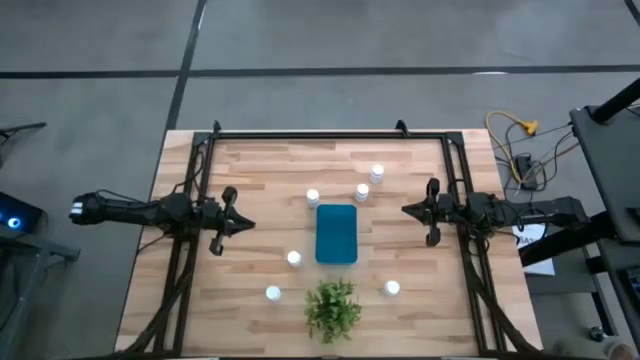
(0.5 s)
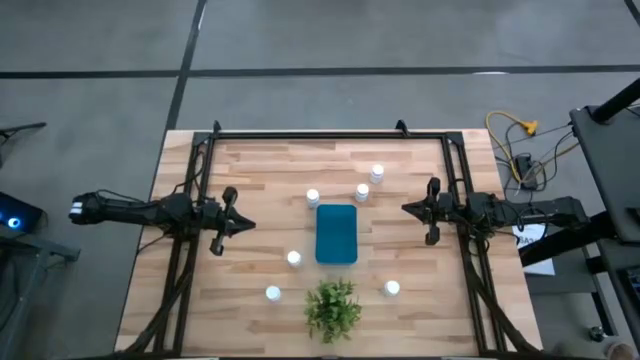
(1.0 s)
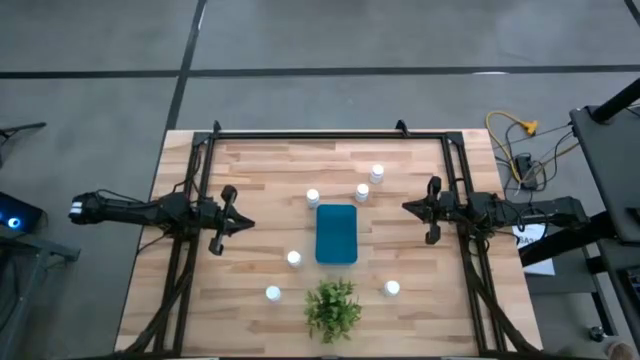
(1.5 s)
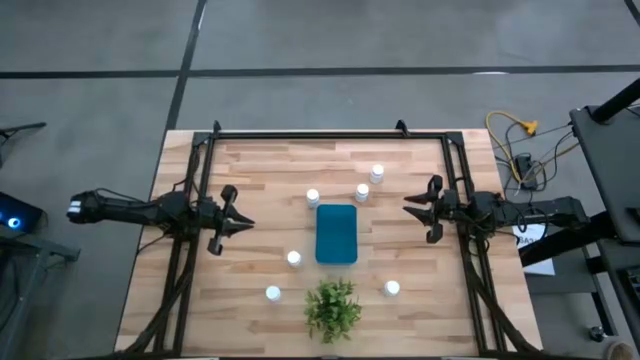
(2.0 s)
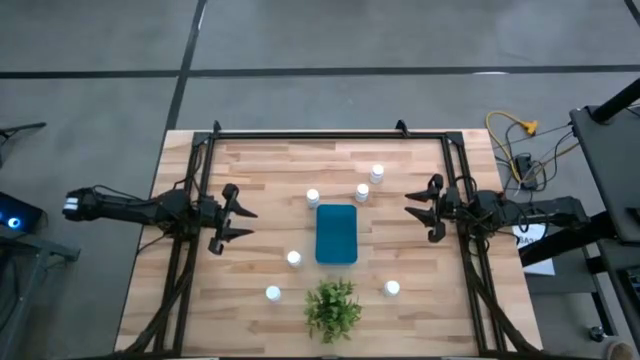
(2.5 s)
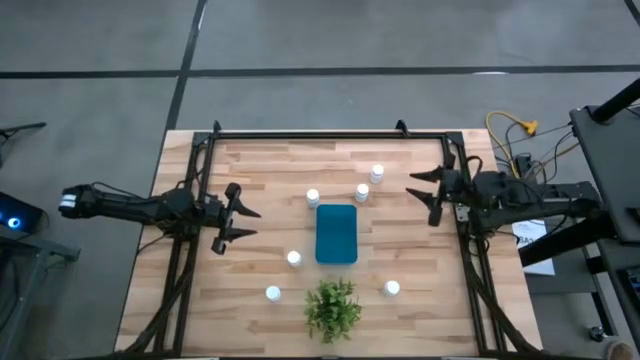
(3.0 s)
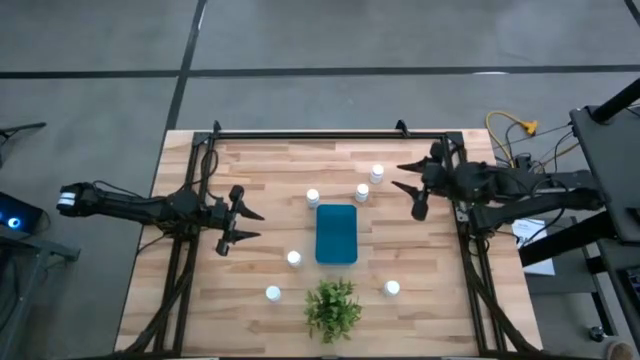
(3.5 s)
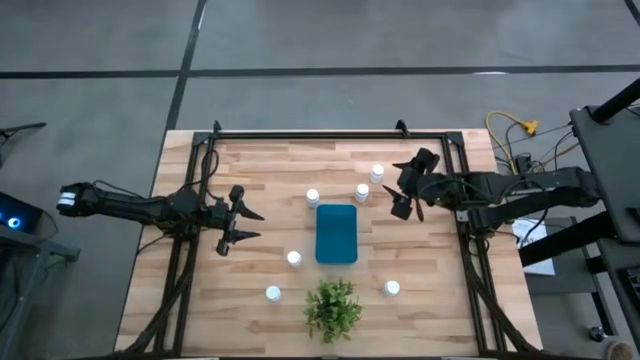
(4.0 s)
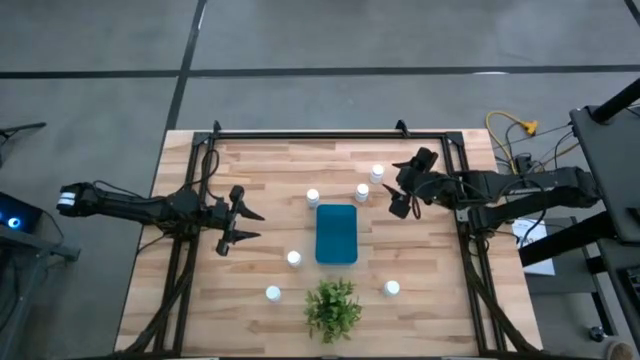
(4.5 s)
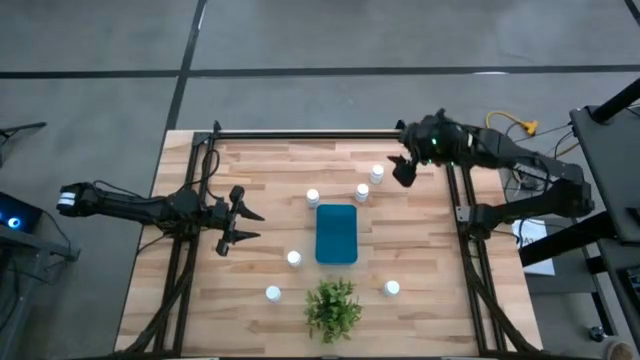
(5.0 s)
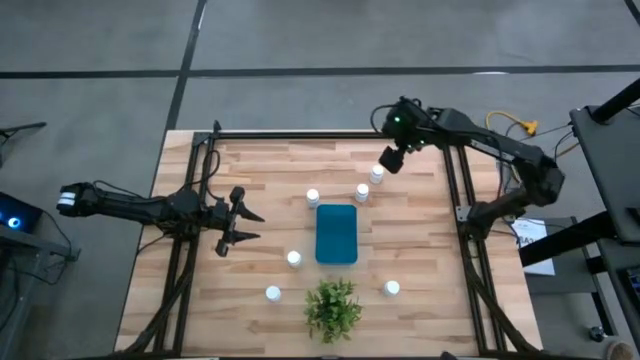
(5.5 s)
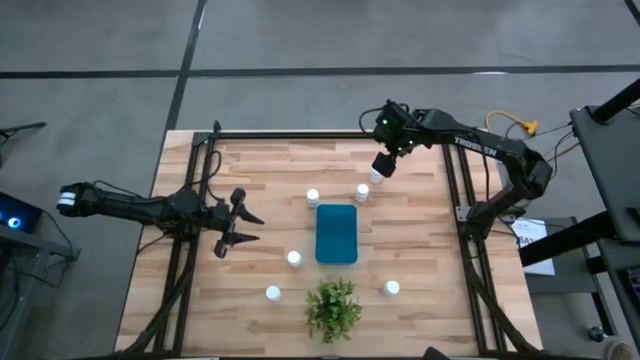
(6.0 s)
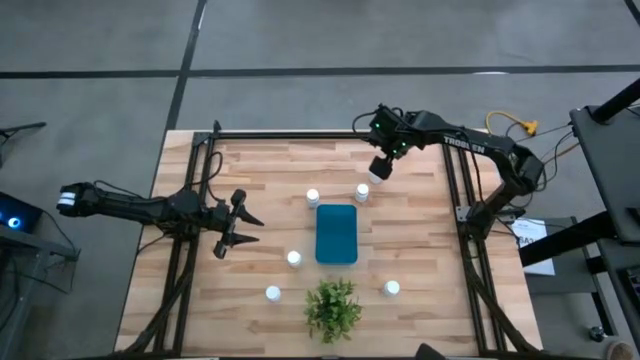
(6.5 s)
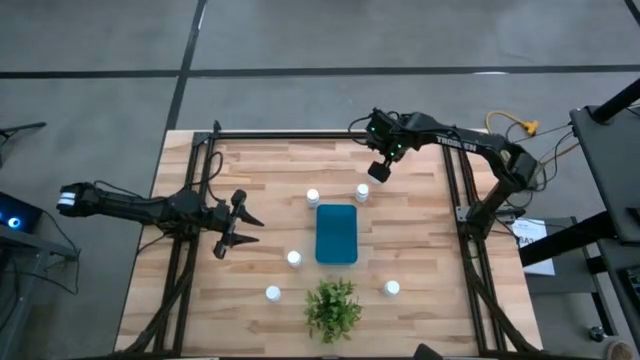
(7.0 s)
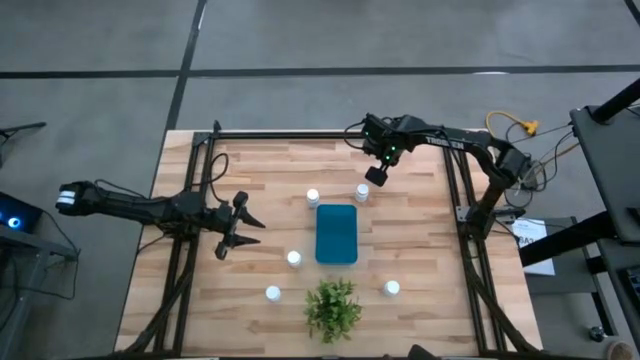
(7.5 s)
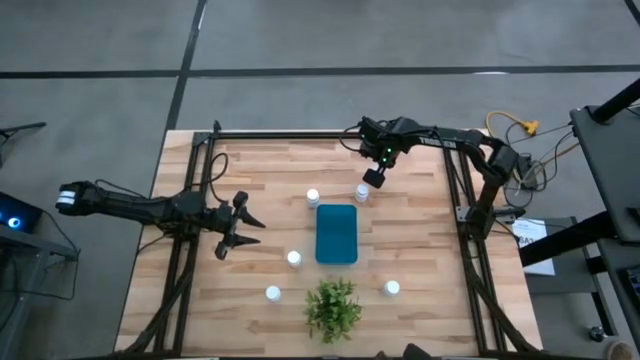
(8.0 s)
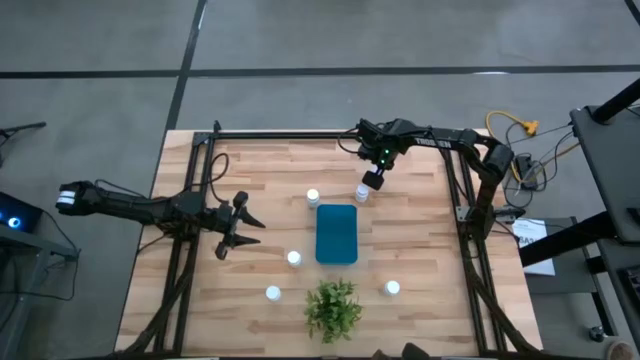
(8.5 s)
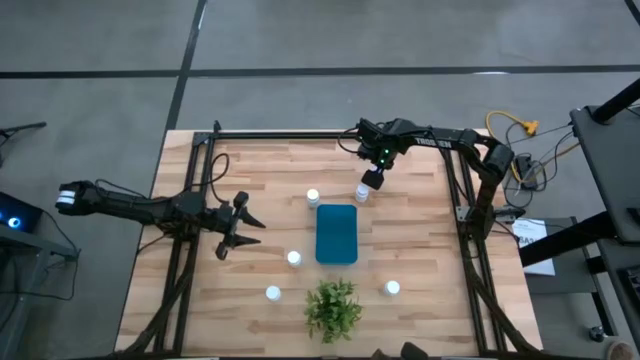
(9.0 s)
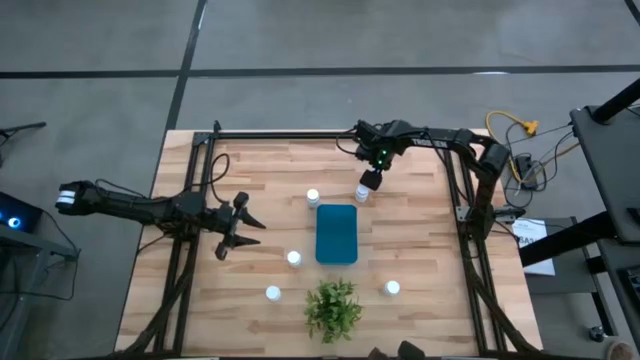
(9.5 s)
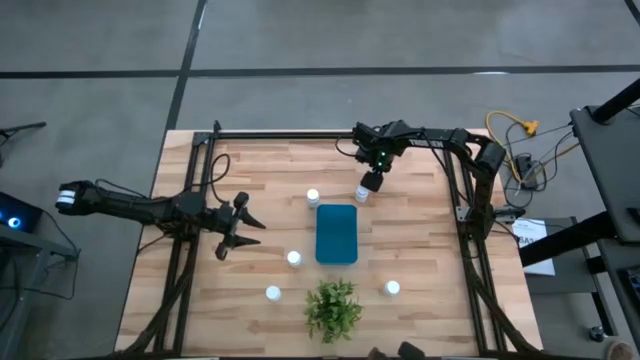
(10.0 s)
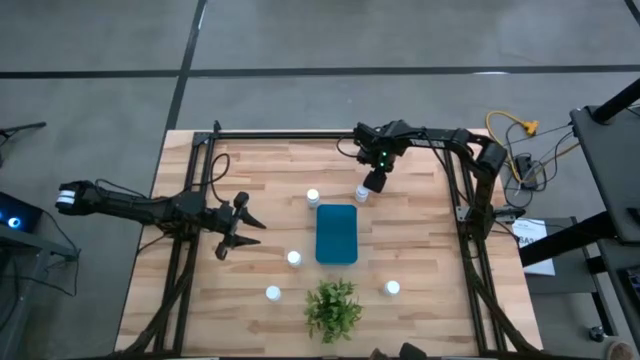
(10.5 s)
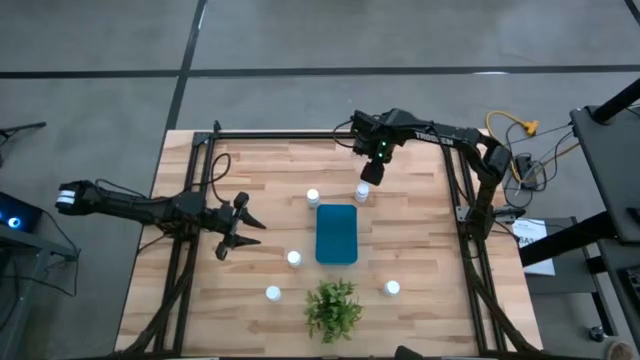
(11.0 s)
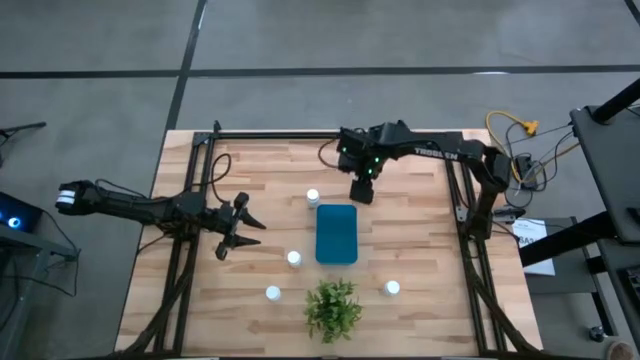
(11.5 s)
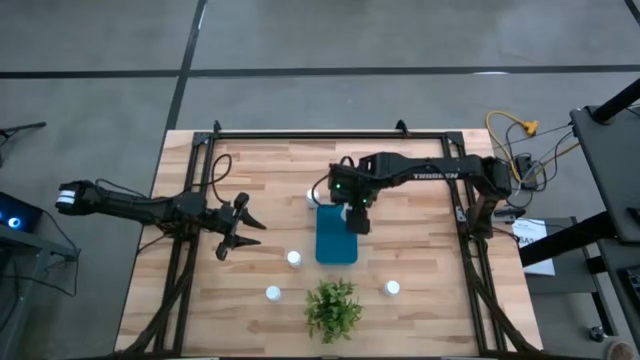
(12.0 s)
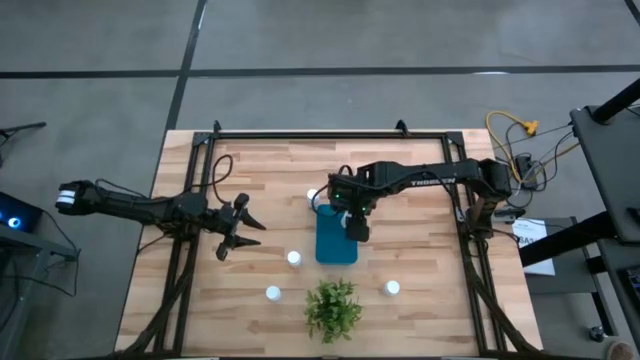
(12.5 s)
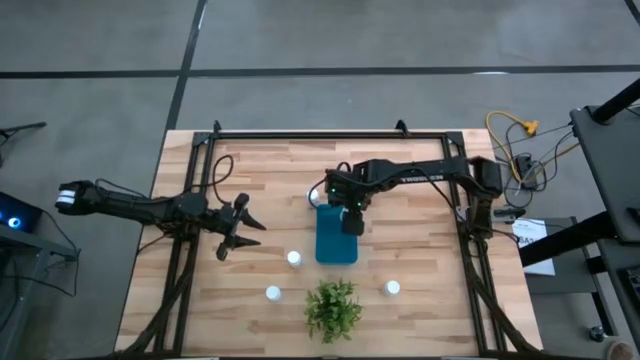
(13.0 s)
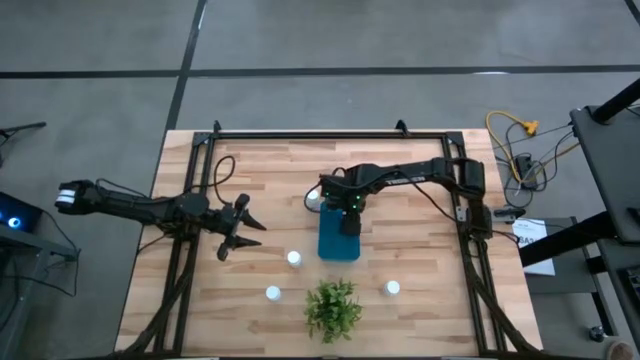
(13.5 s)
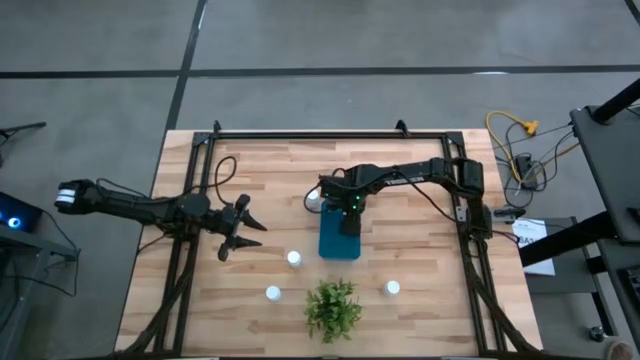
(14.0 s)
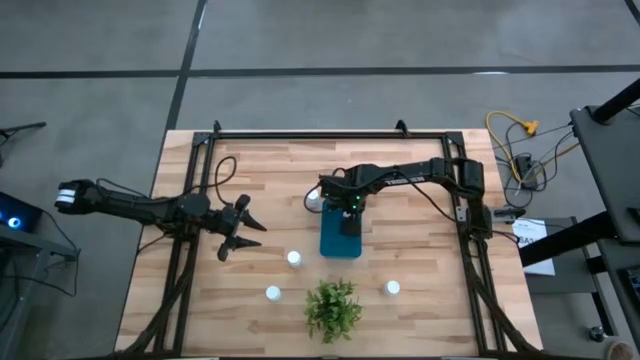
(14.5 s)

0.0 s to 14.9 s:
Task: Pick and place pill bottles into a basket
Put the white pill bottle into the blue bin

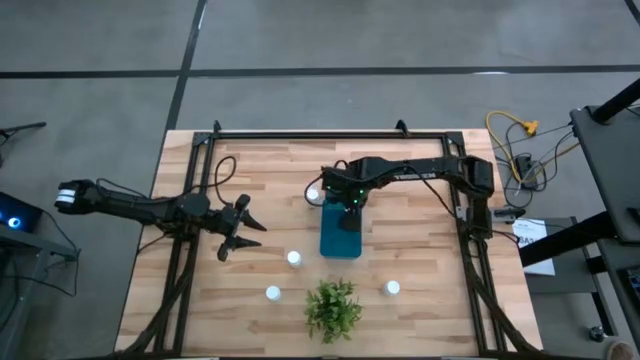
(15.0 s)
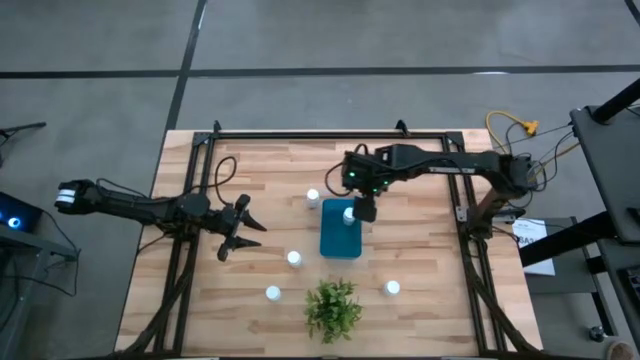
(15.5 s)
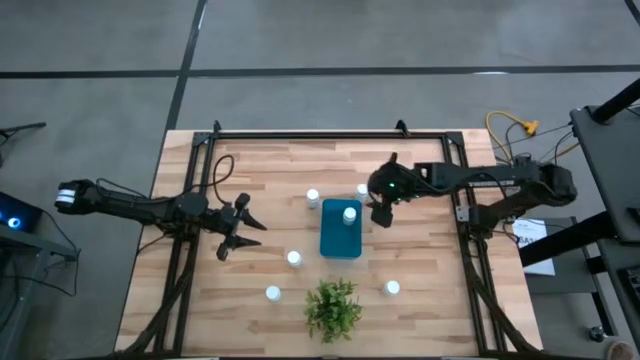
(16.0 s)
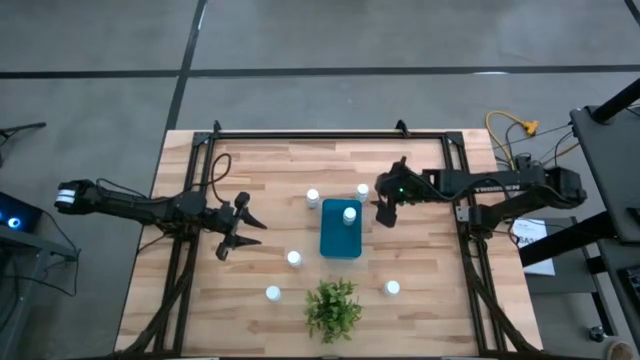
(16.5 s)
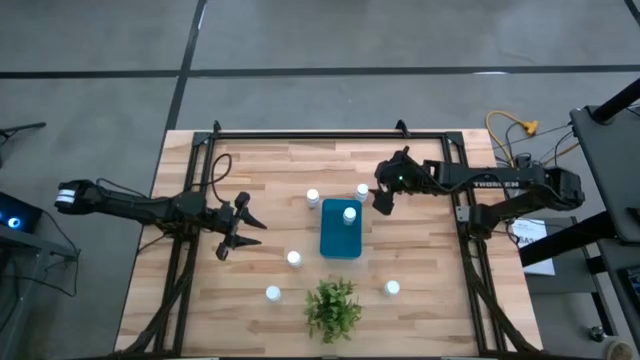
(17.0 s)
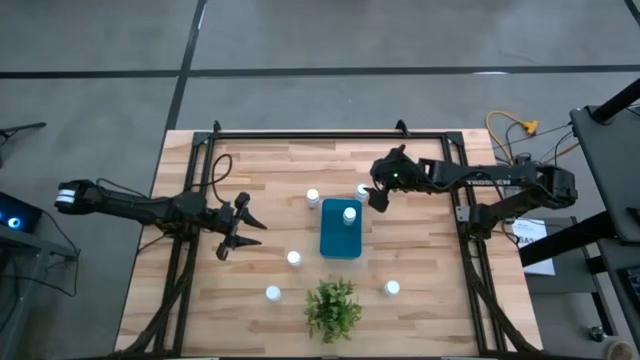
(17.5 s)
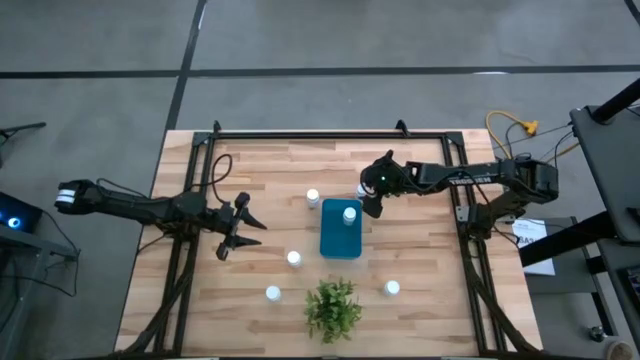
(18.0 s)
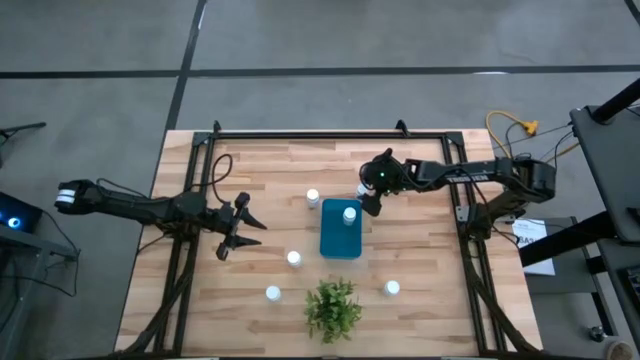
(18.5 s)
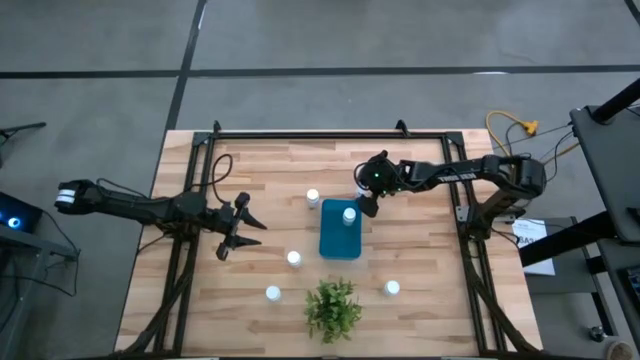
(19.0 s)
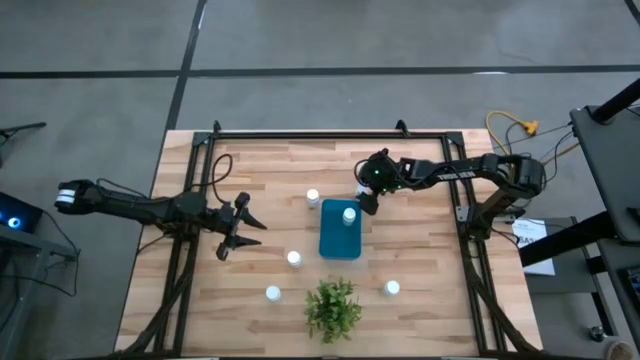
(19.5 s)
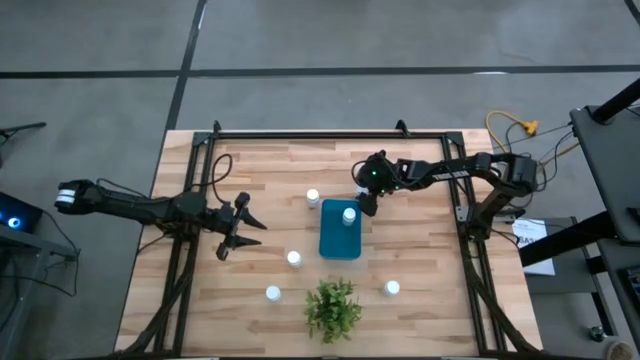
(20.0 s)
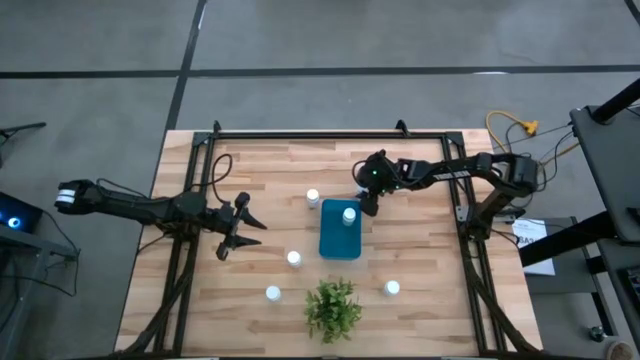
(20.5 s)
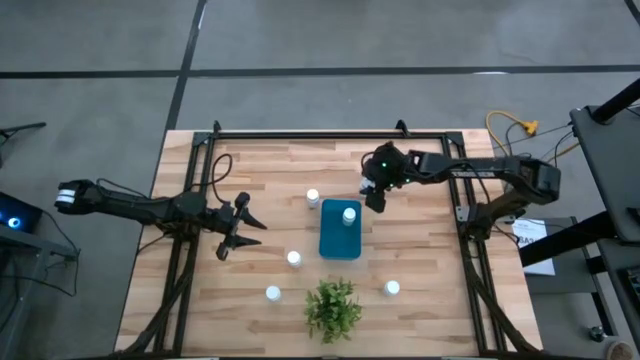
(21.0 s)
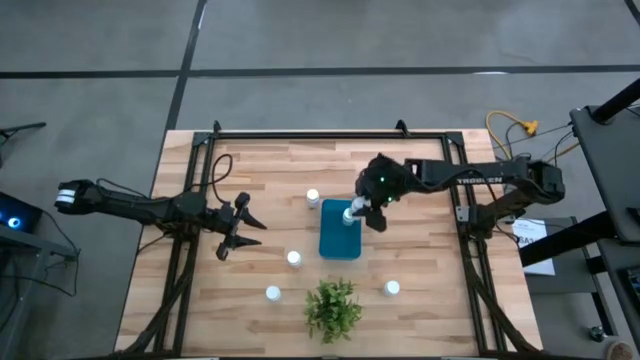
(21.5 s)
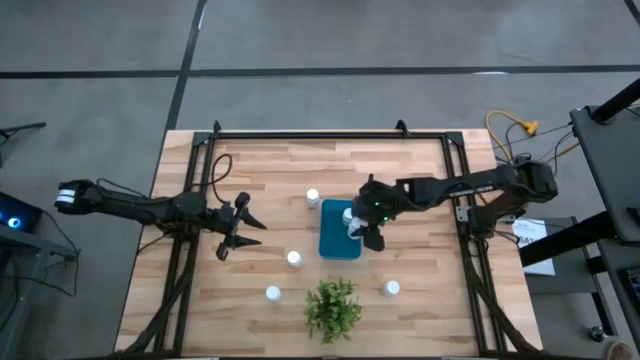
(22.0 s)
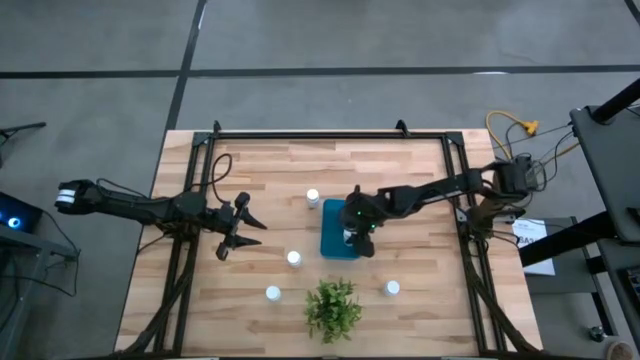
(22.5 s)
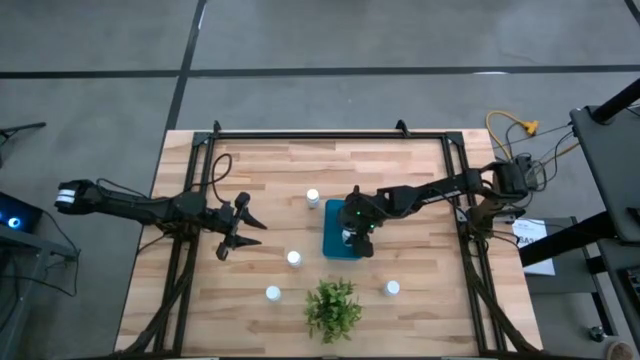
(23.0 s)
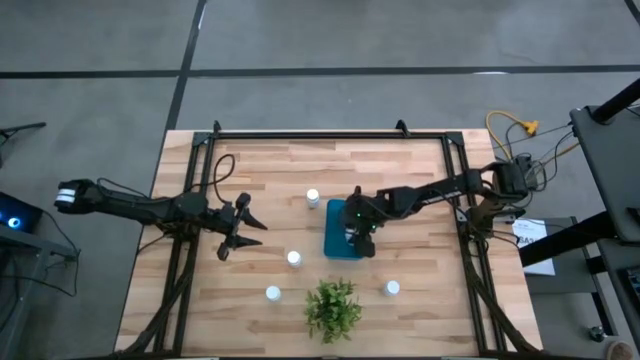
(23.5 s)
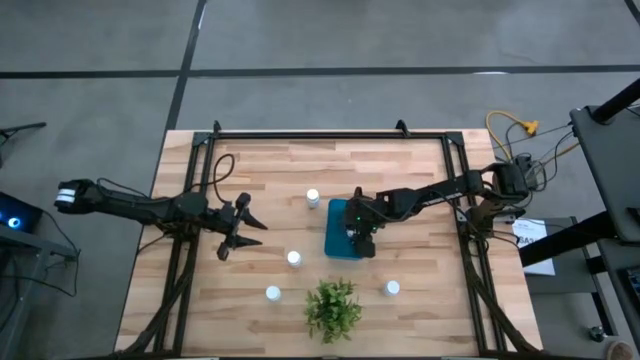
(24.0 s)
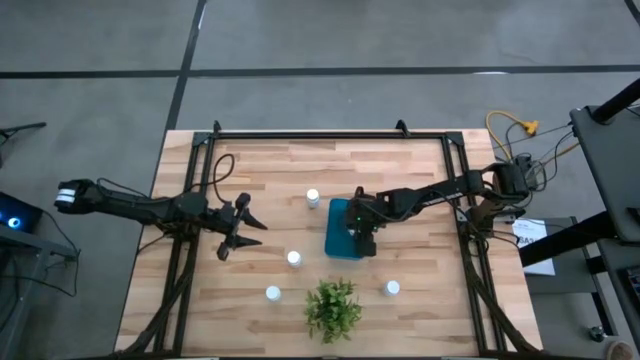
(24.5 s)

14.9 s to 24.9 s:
Put the white pill bottle into the blue bin
